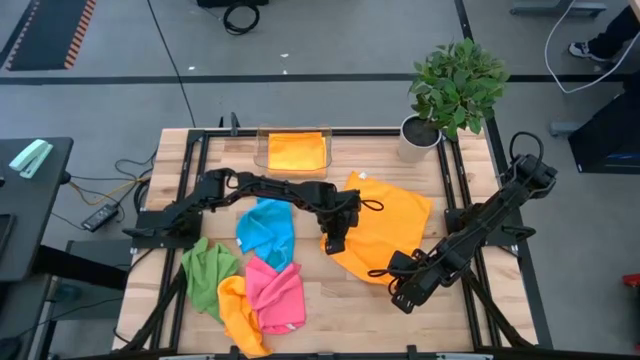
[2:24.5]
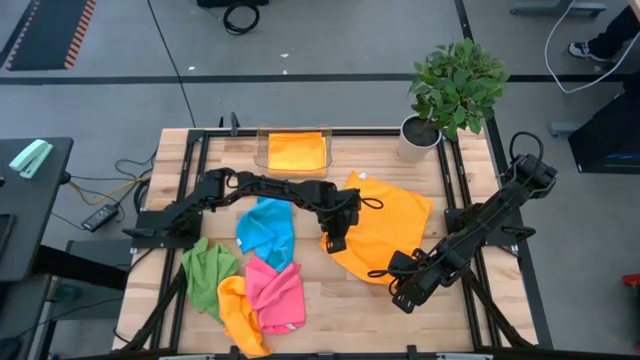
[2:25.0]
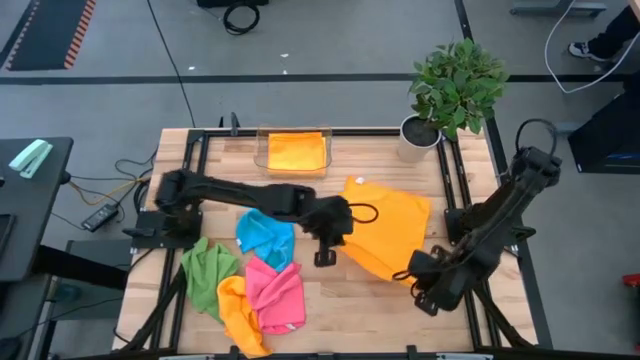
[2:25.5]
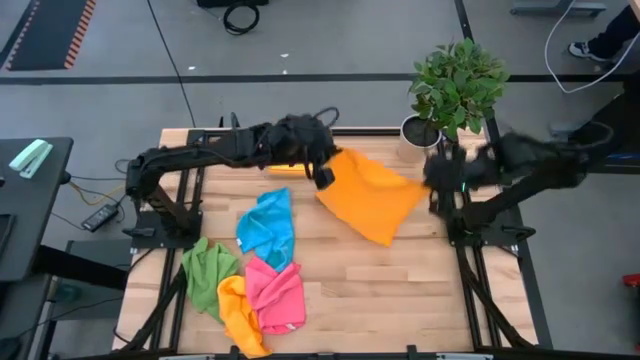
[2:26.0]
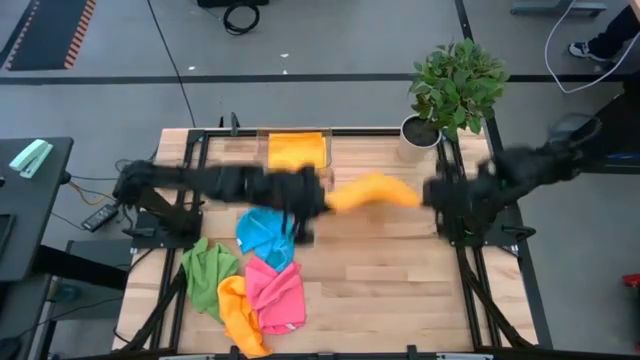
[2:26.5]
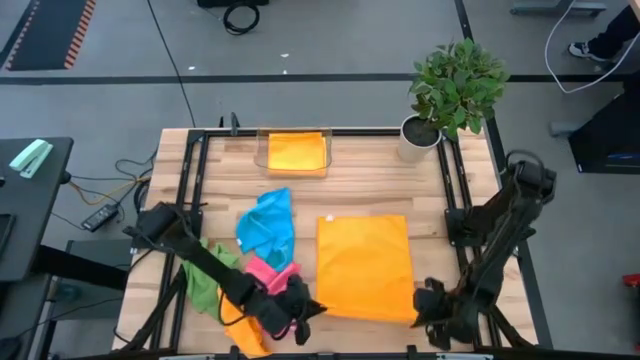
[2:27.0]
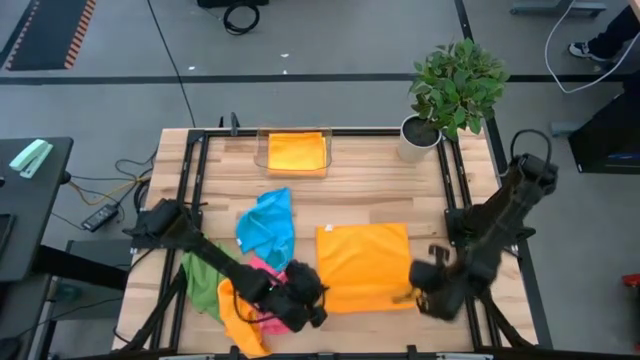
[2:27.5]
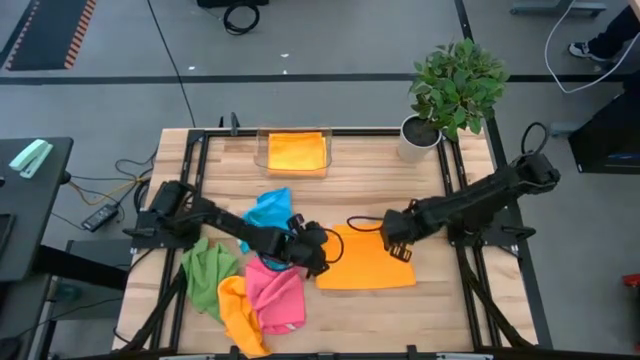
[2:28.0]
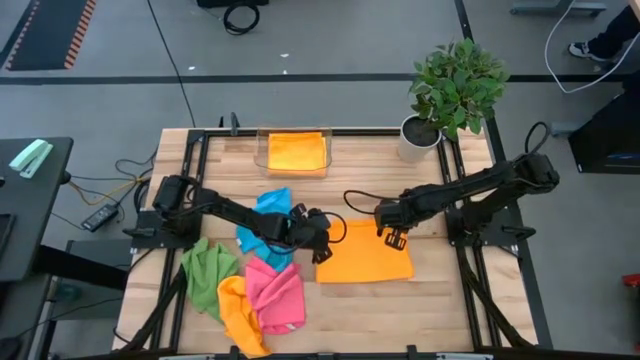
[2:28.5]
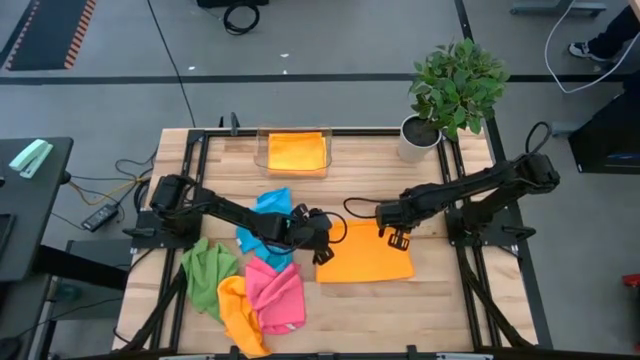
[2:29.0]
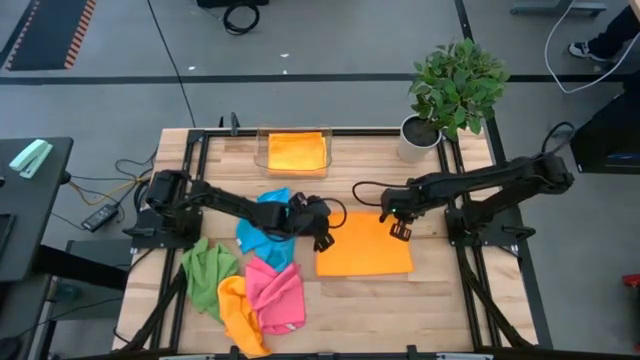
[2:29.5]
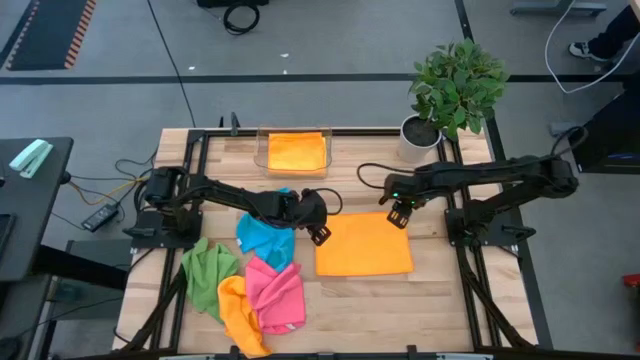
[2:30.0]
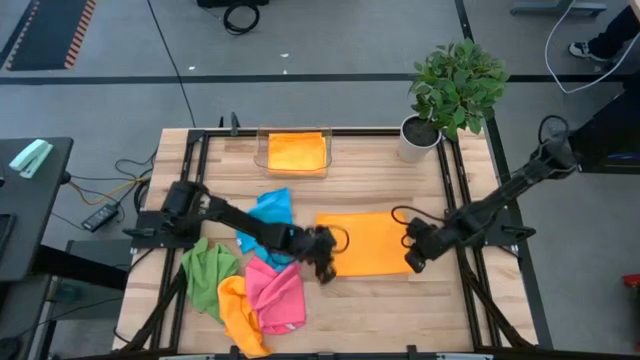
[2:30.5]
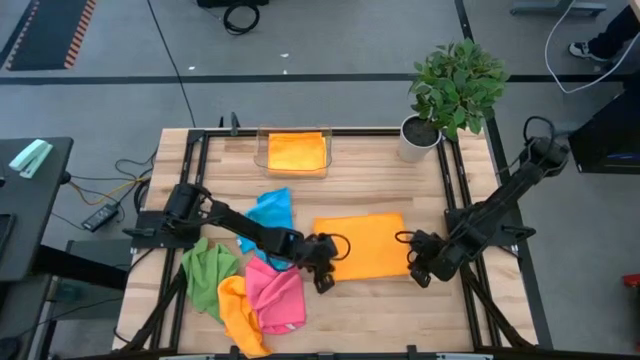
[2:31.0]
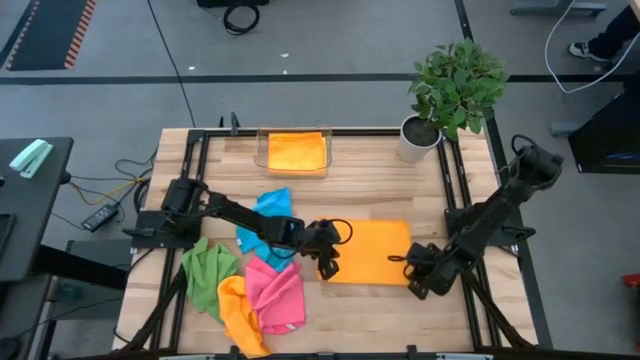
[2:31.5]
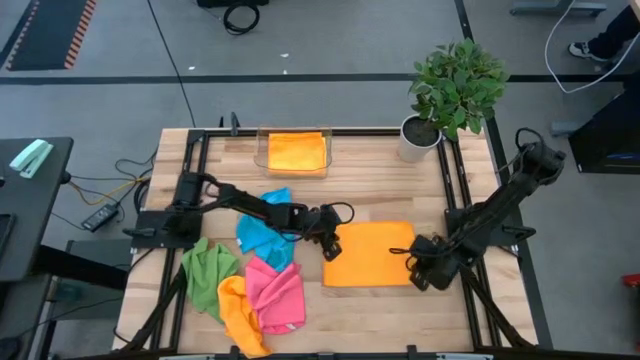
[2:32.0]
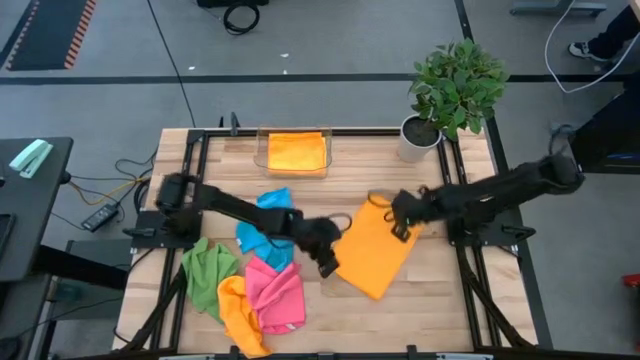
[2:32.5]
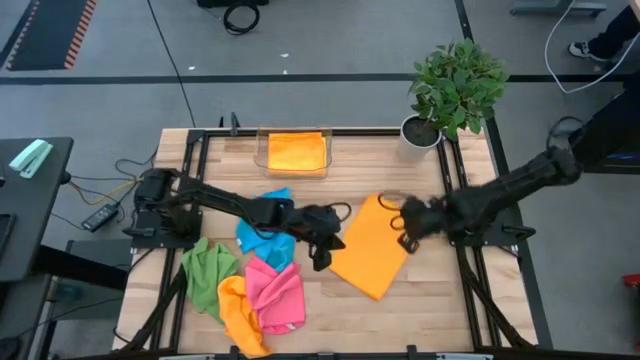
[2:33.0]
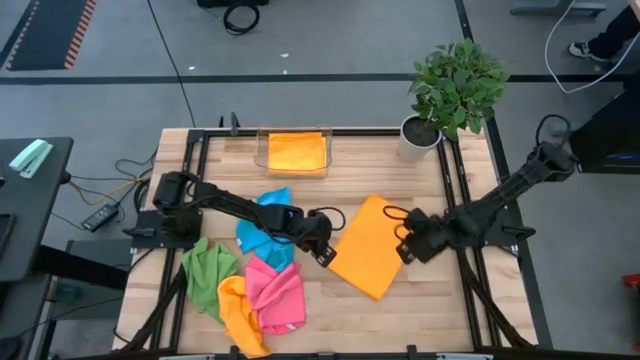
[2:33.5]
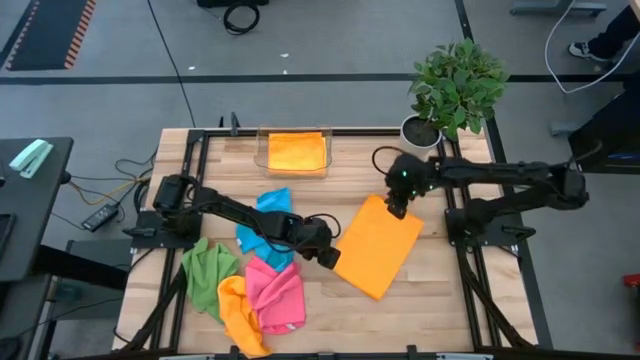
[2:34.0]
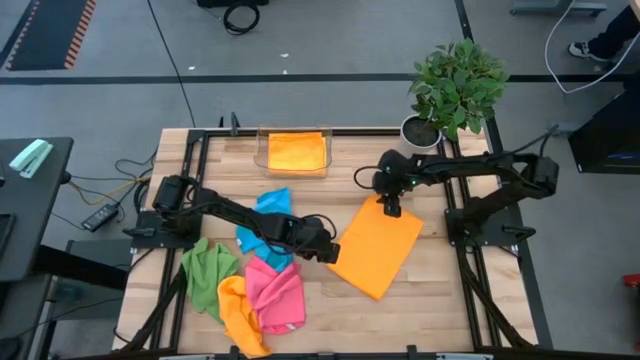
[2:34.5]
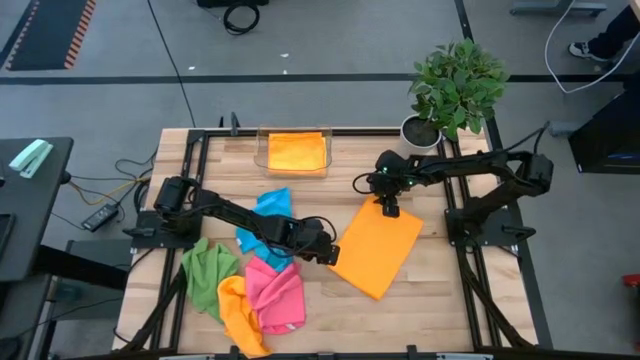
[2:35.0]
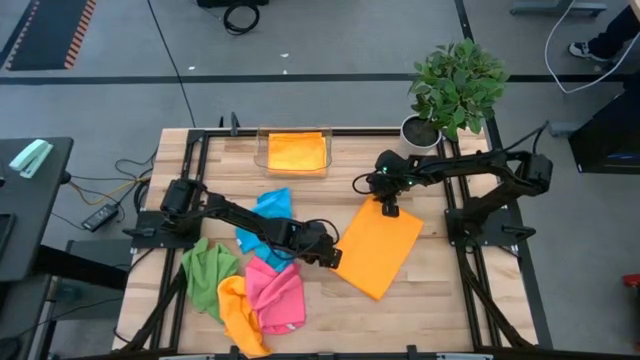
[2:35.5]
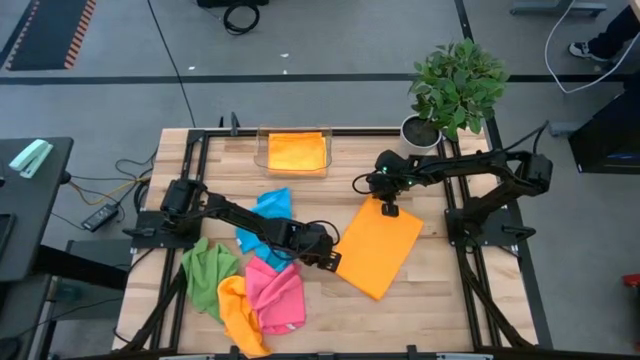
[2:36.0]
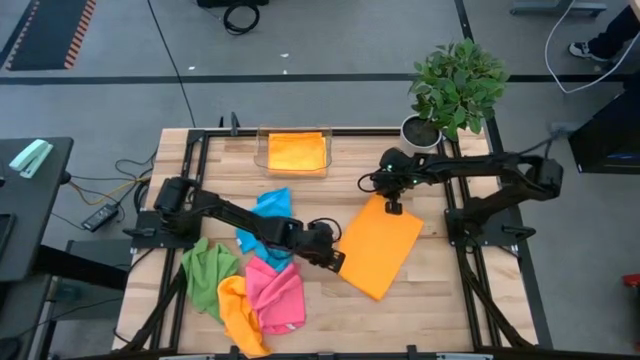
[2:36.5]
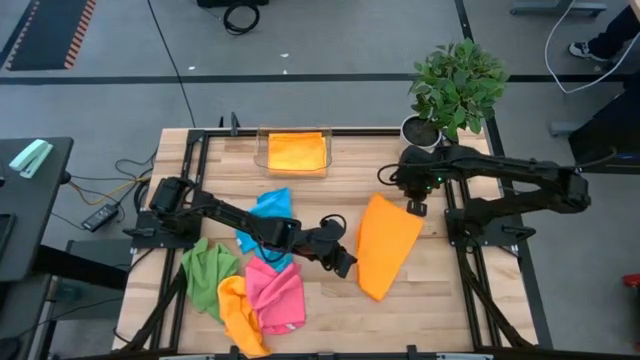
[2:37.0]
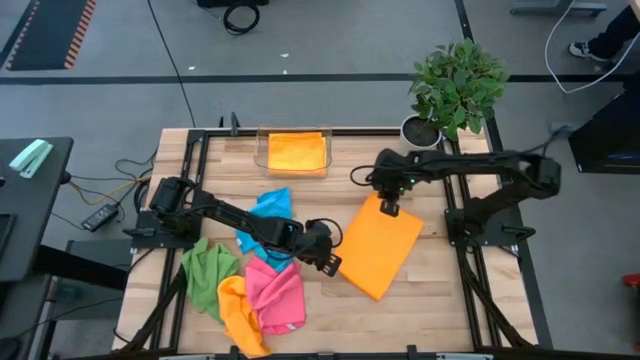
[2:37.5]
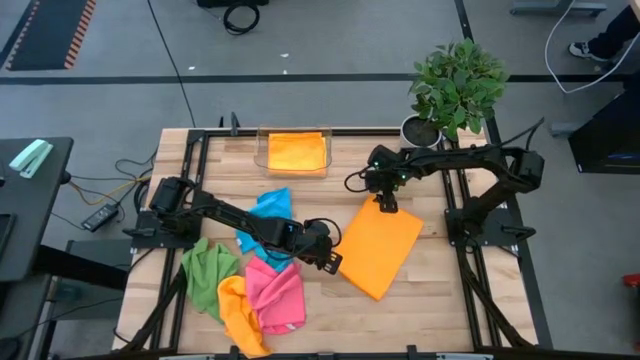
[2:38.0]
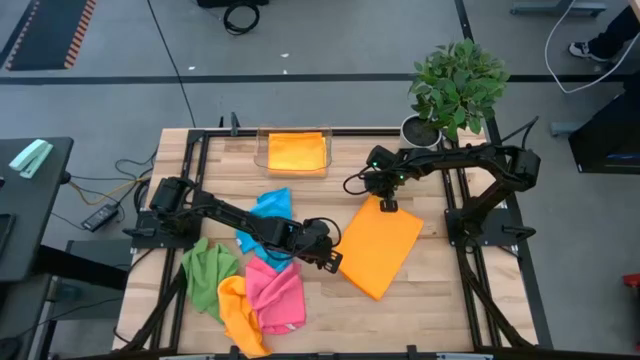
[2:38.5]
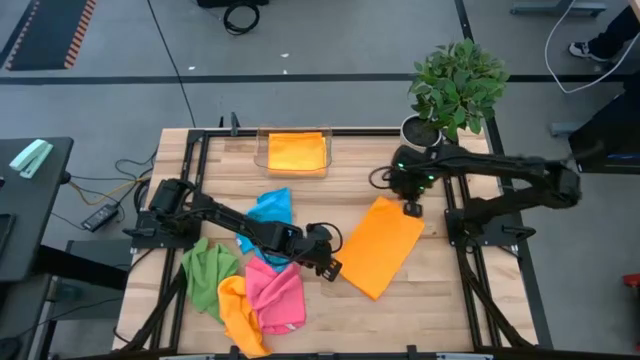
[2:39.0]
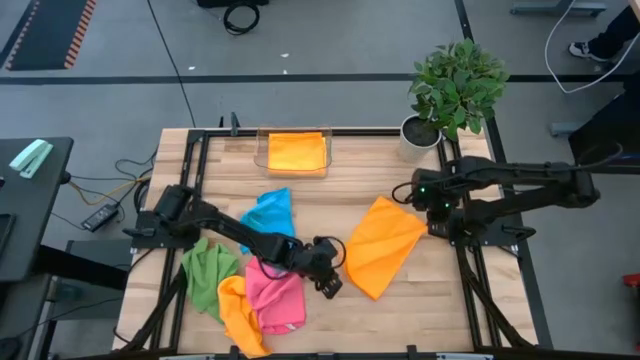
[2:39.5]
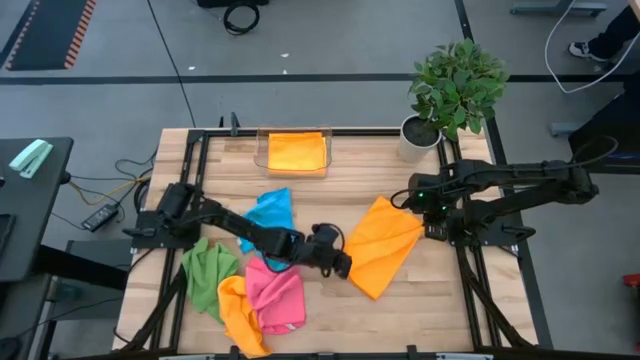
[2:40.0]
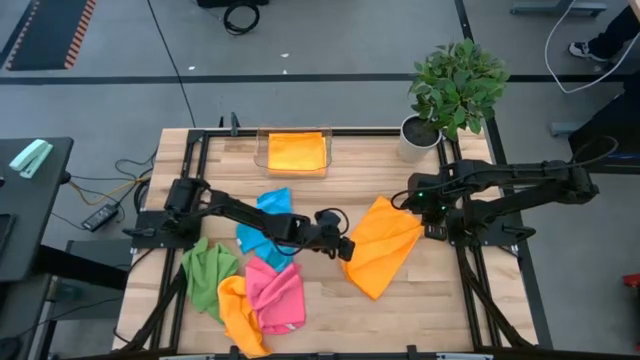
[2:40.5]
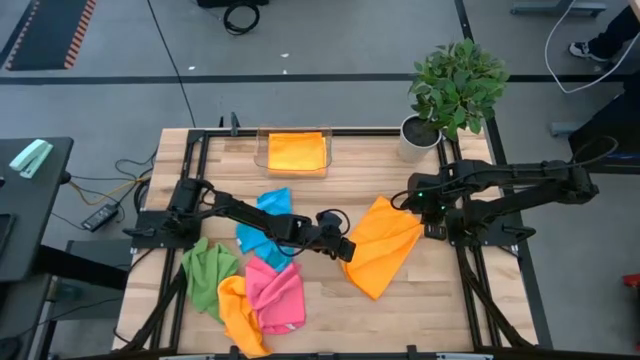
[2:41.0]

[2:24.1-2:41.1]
Task: Fold microfiber towels
Fold the orange microfiber towel

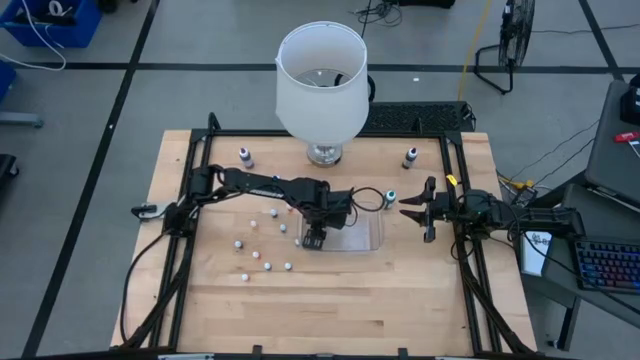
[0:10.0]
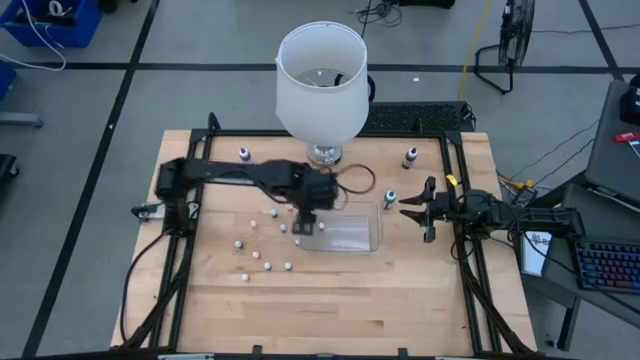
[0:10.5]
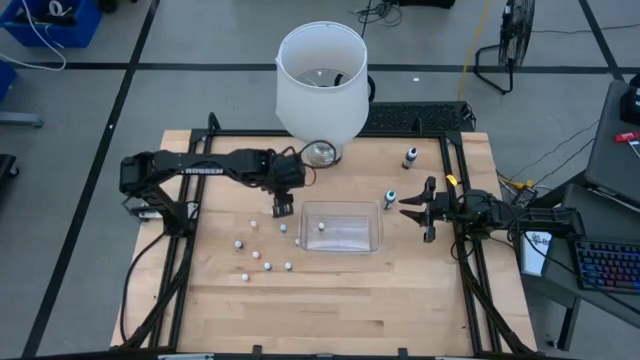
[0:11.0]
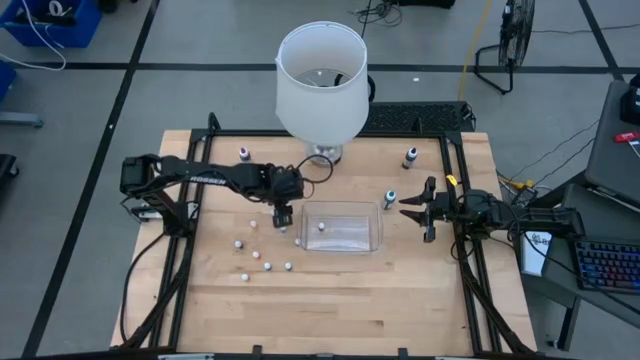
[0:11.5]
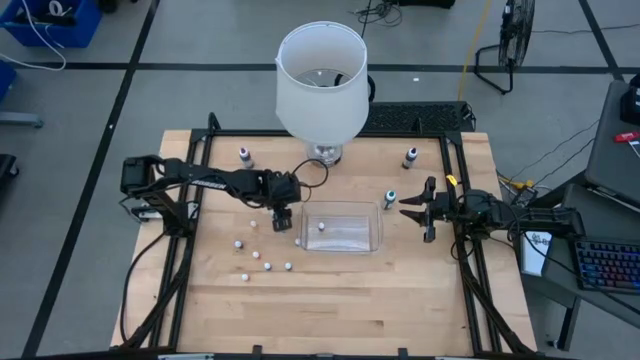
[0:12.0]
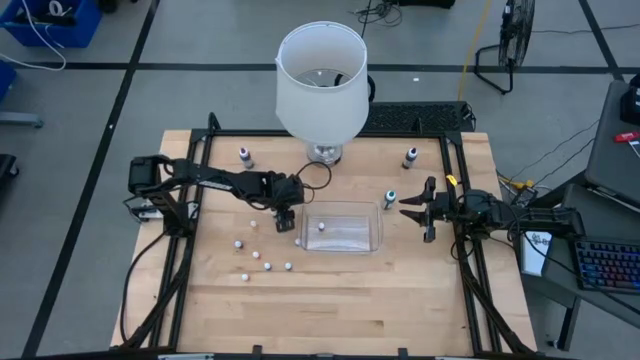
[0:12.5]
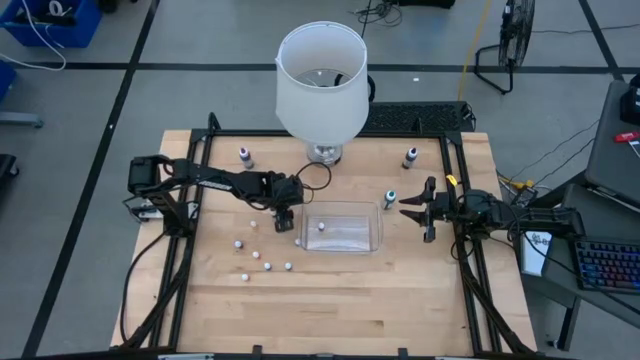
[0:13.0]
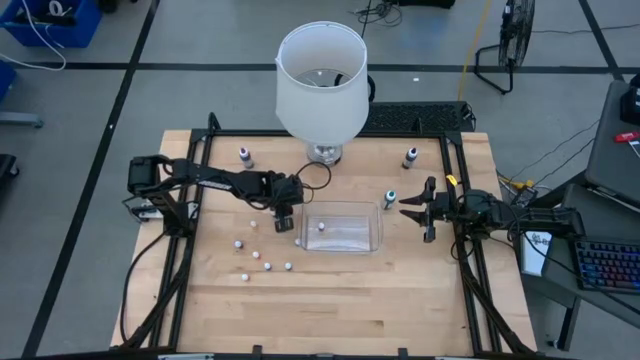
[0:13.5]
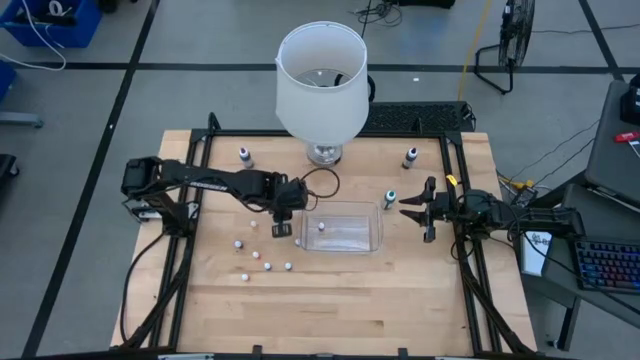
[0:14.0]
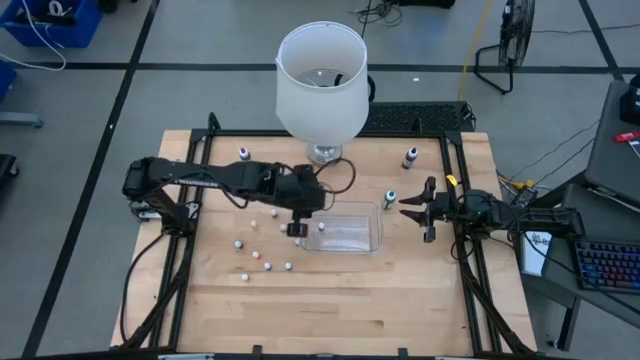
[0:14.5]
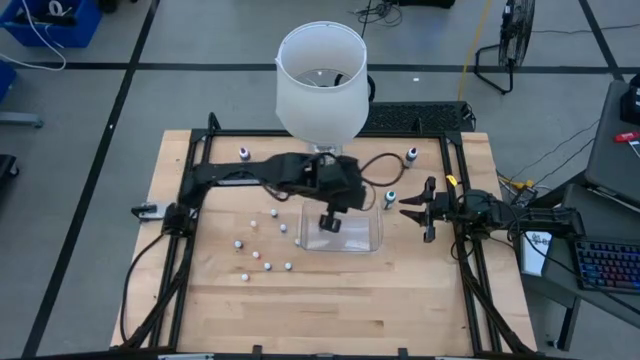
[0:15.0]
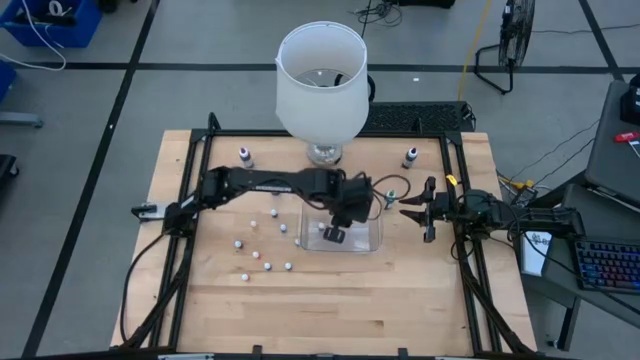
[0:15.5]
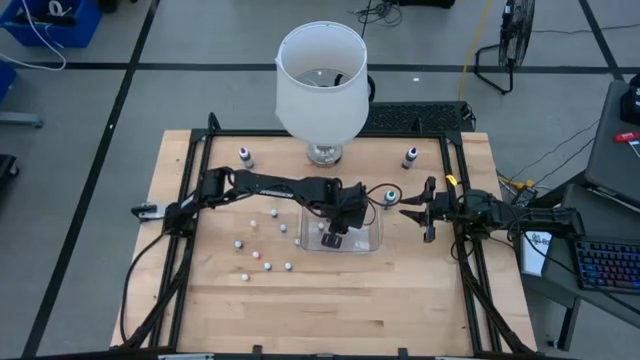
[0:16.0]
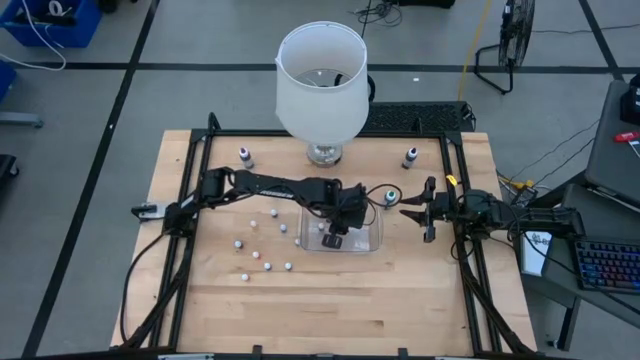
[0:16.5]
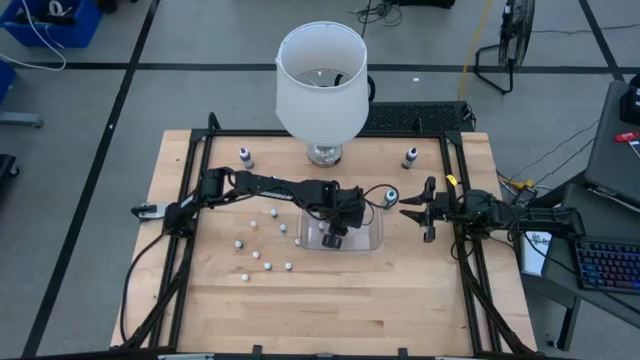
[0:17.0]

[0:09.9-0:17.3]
Task: Pick & Place food coloring
Put the yellow food coloring bottle into the transparent bin
